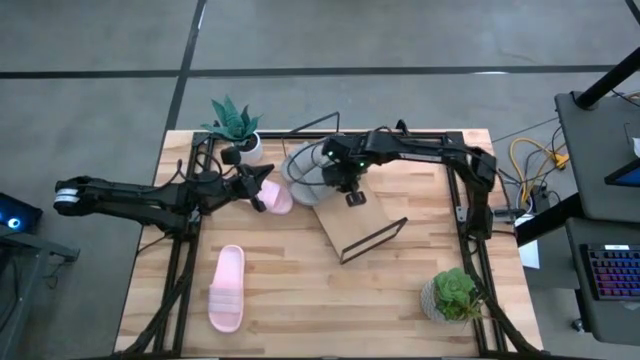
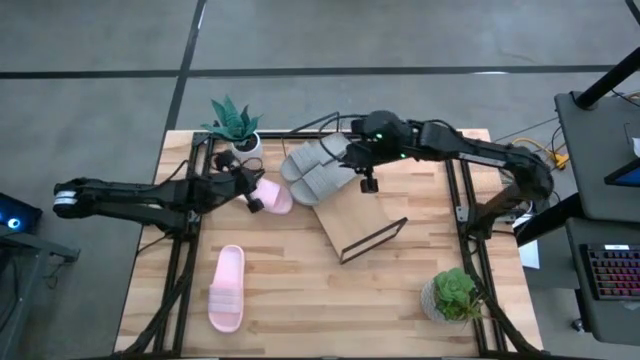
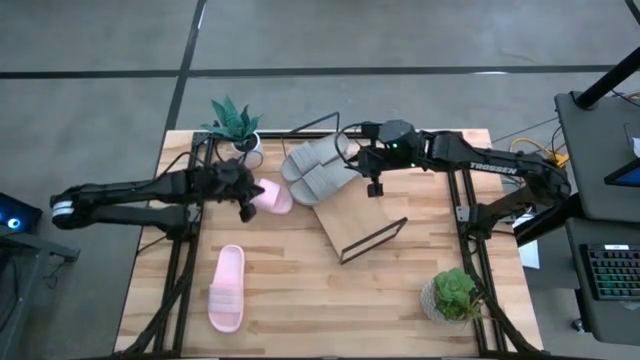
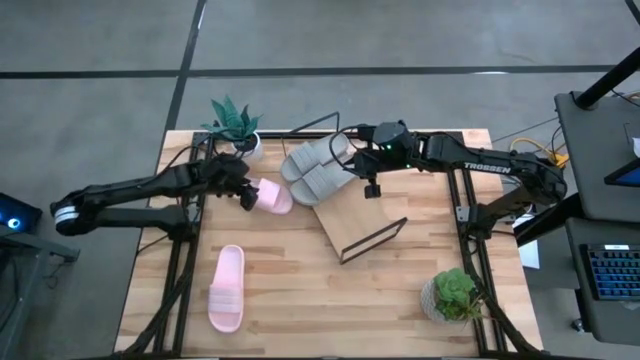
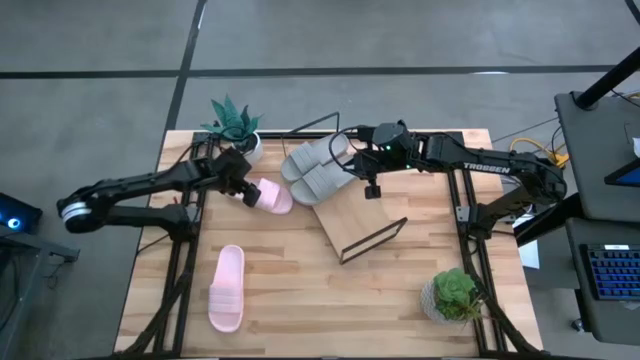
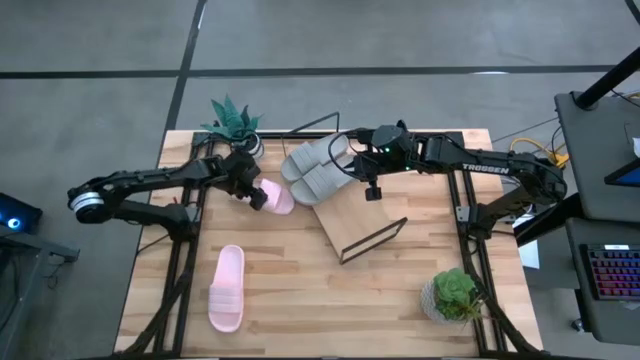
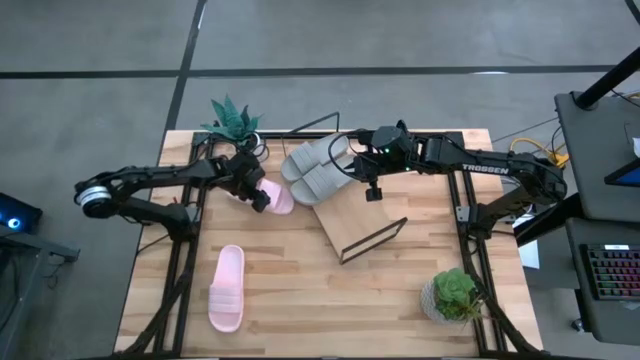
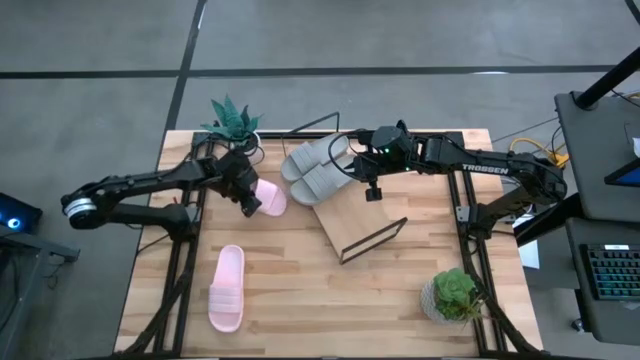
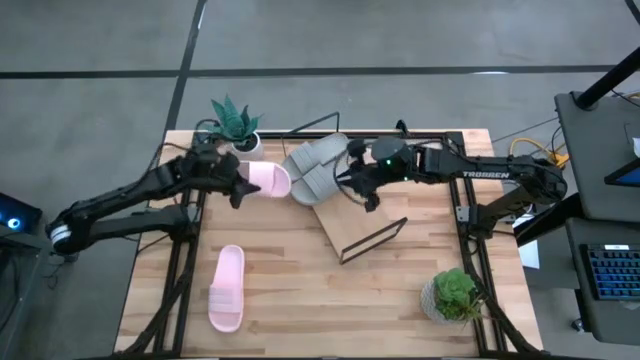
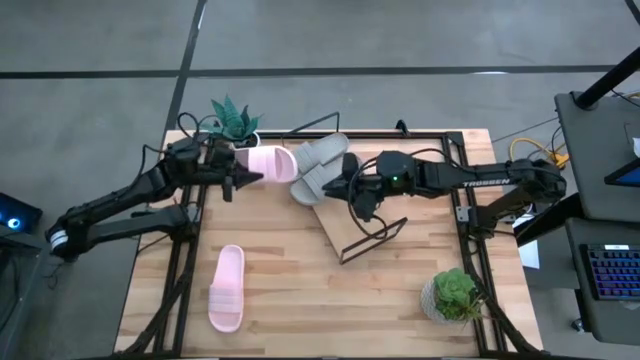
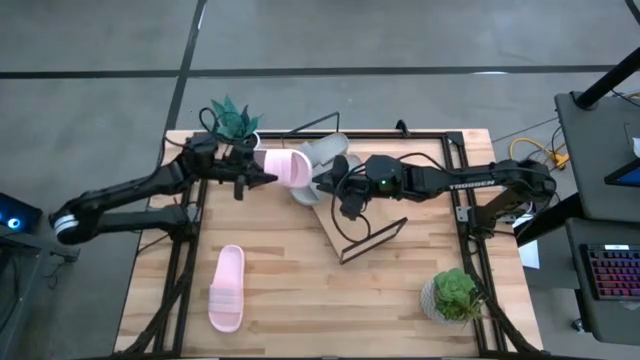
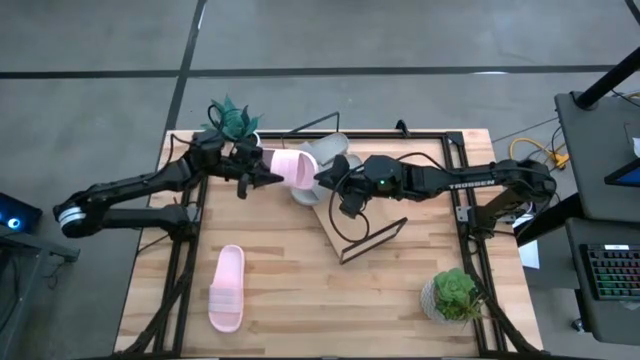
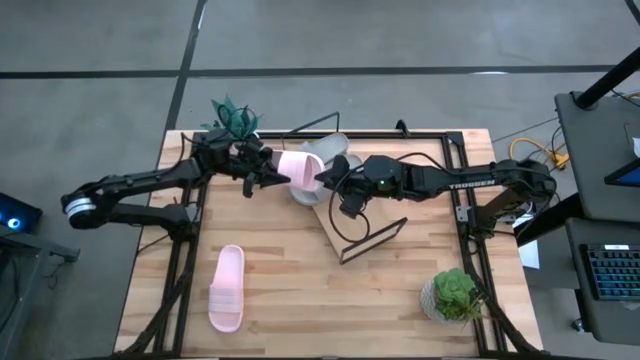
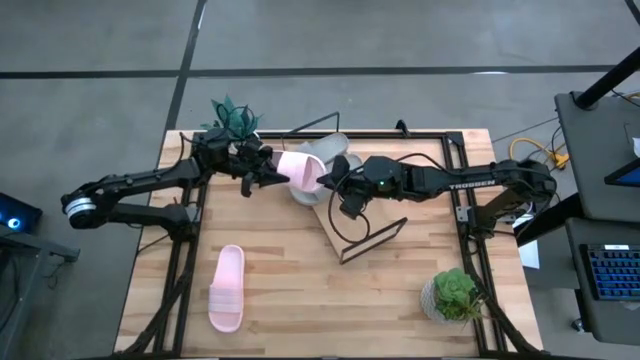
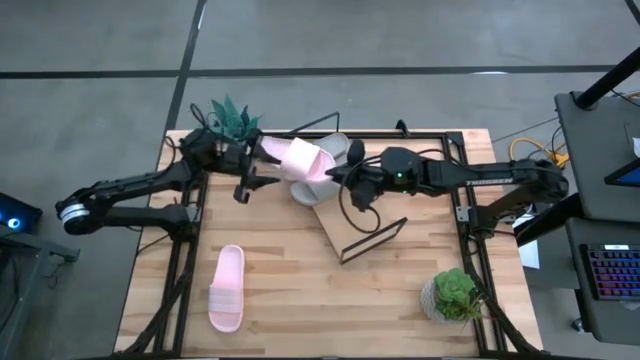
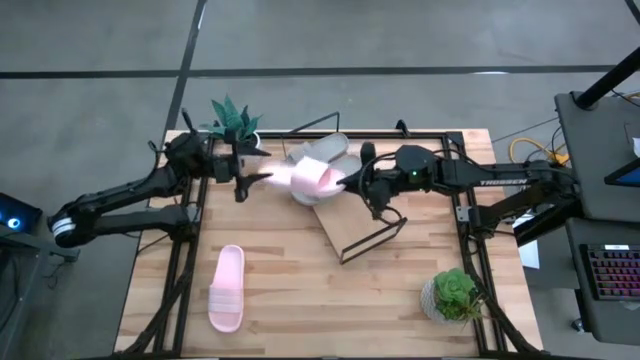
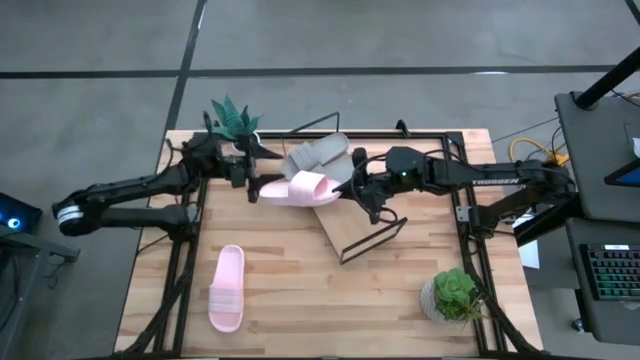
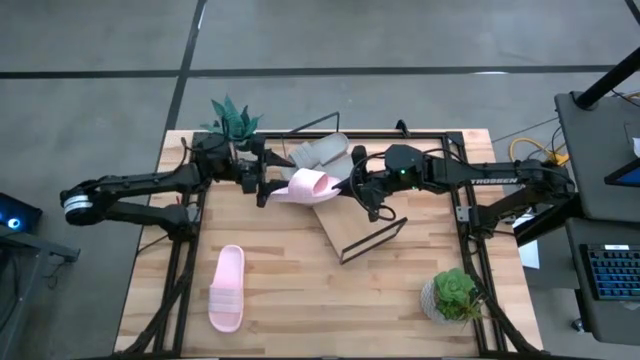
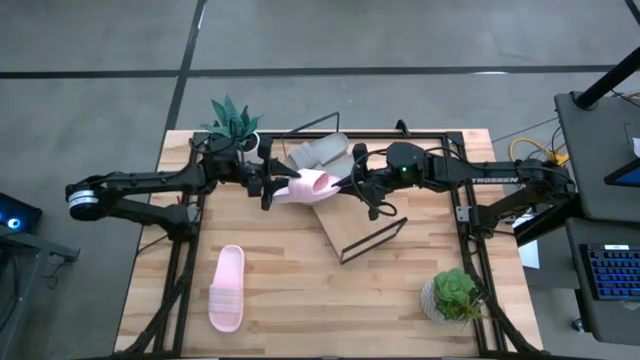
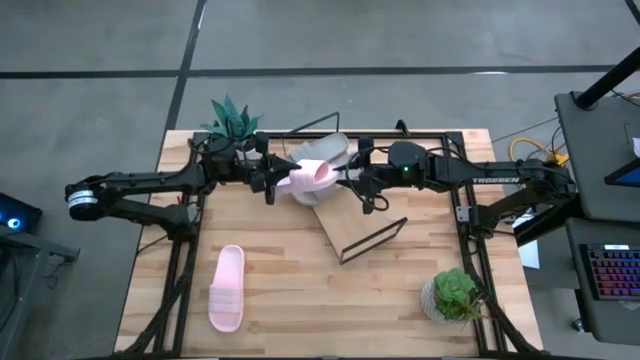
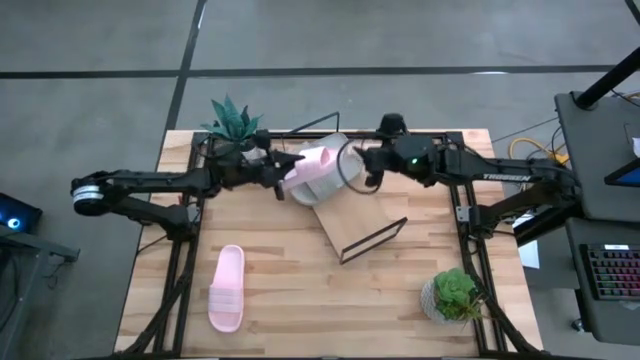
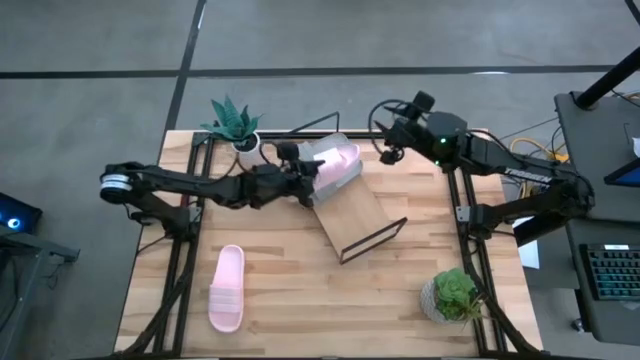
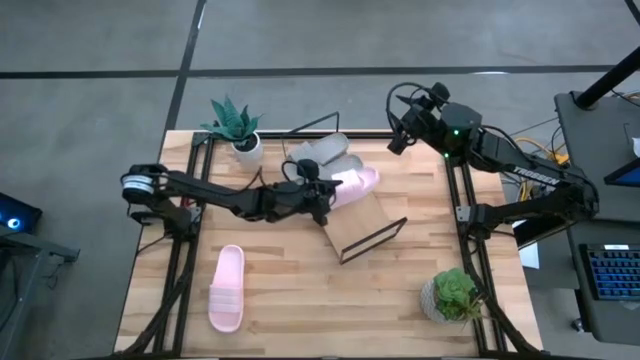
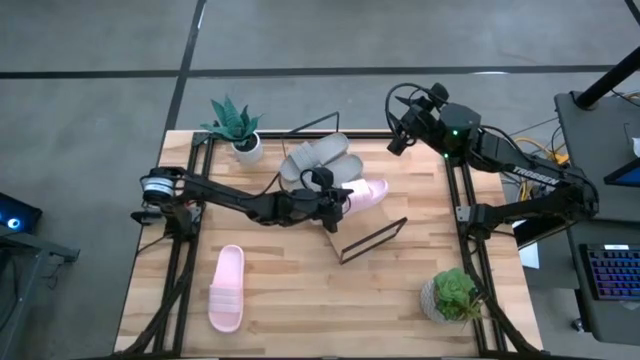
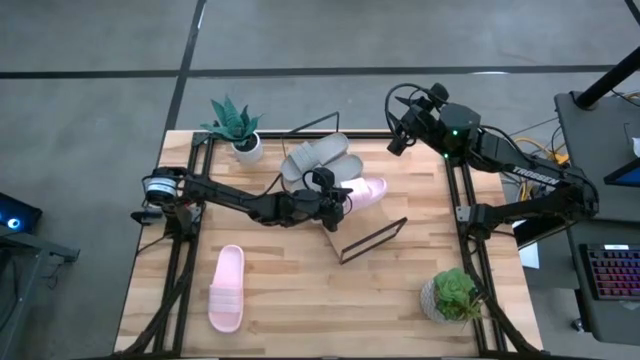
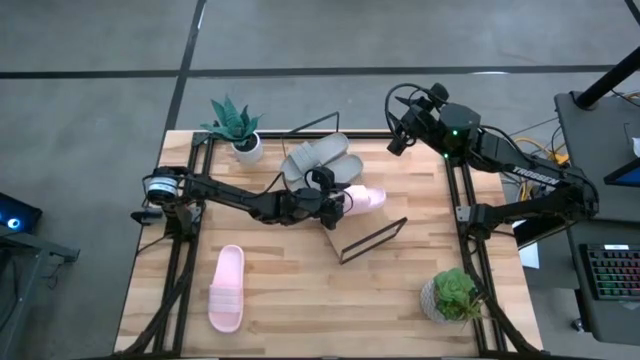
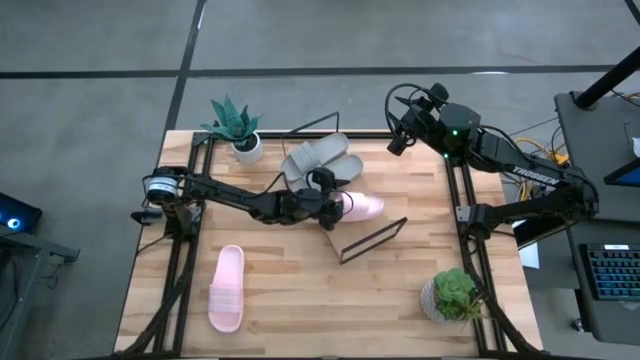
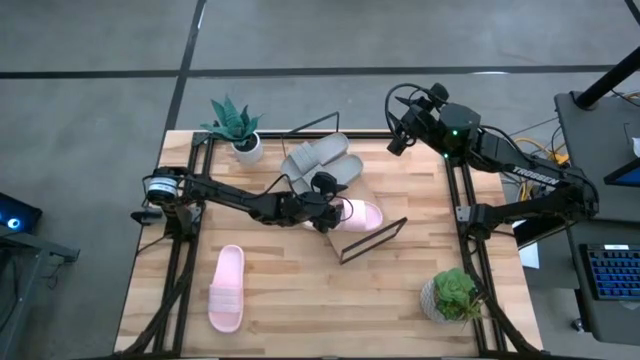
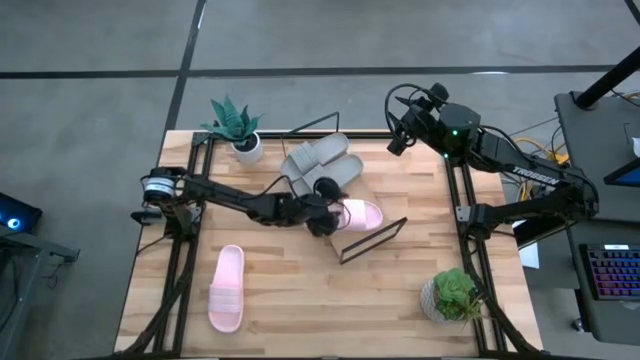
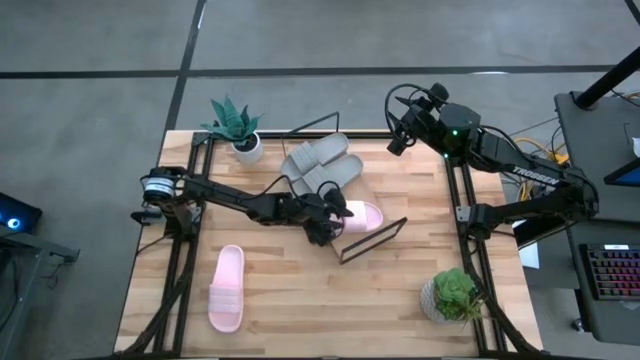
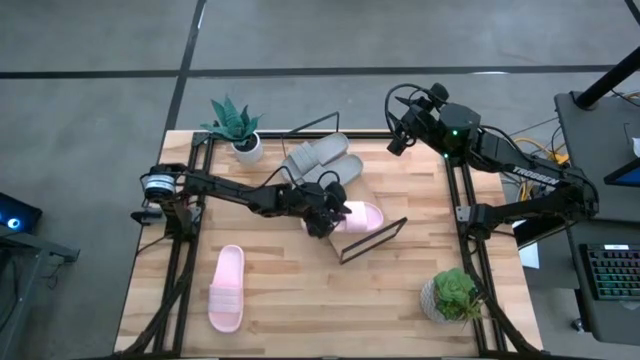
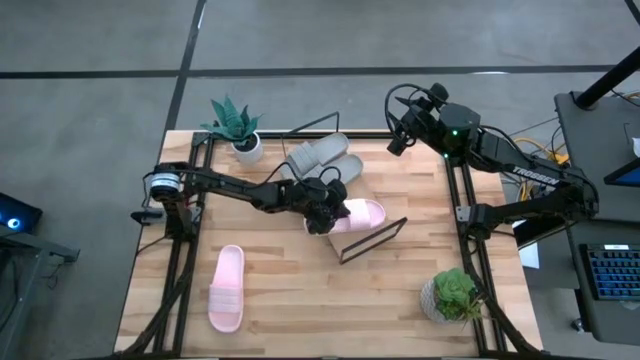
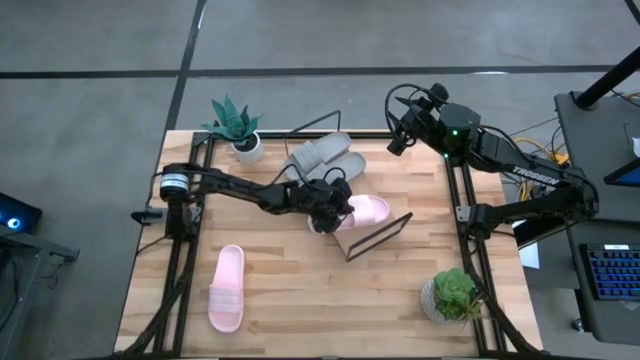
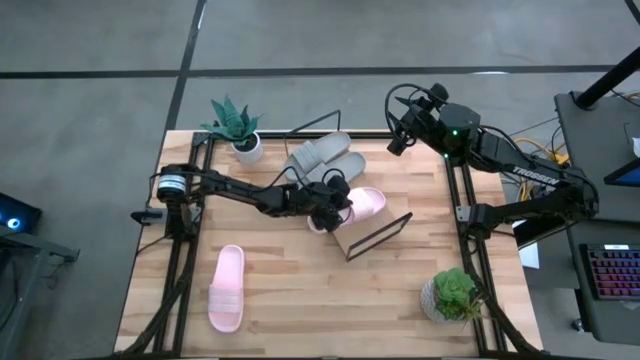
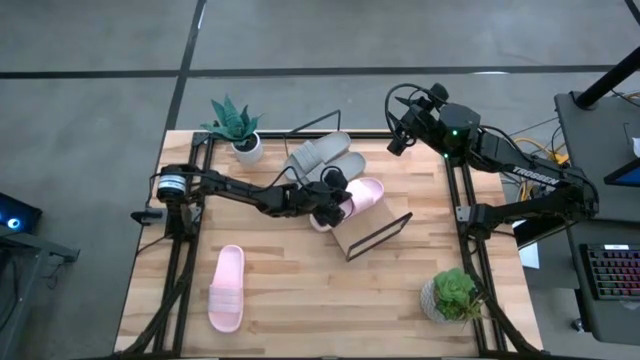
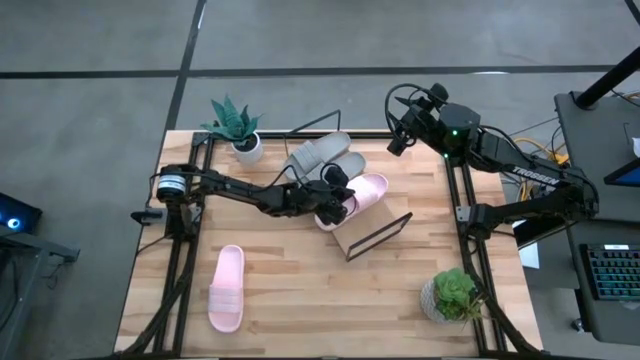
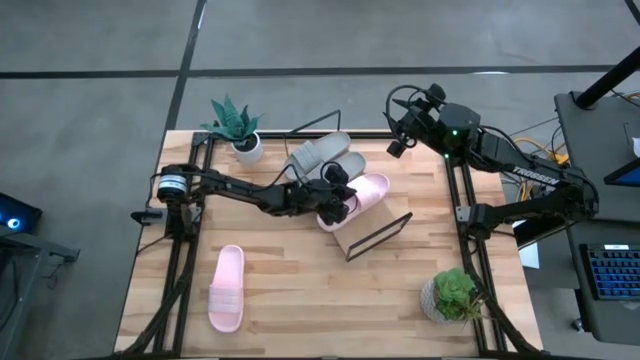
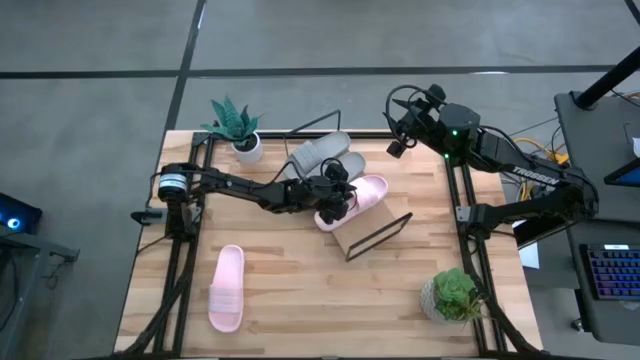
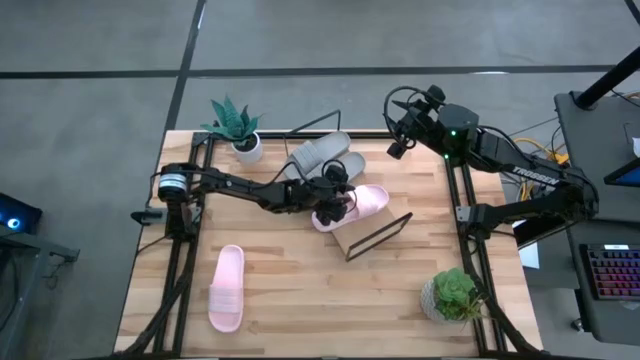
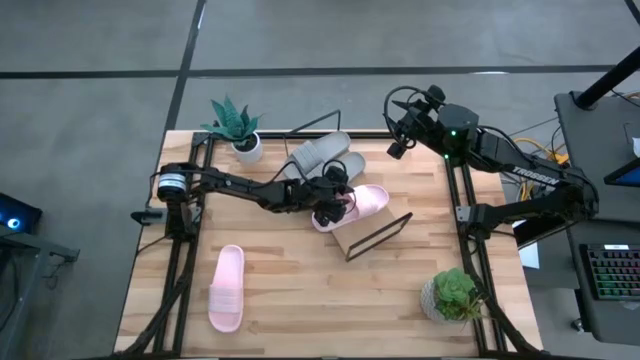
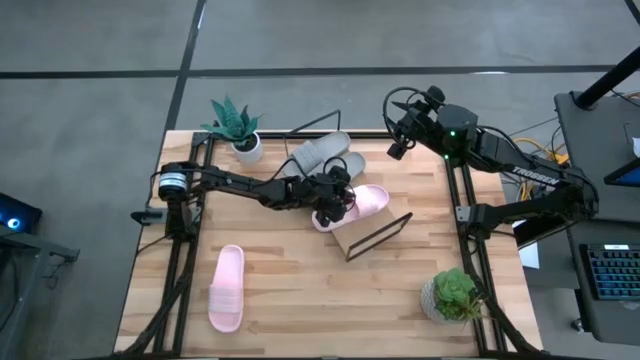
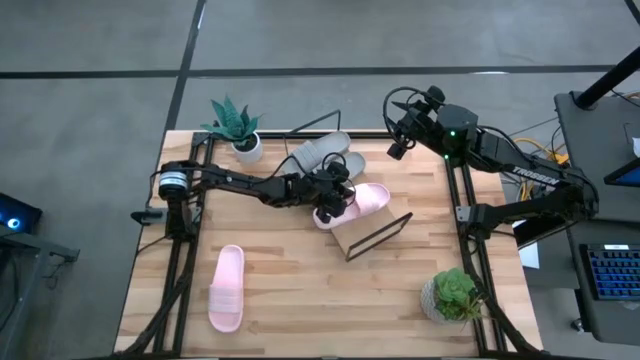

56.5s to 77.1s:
Task: Pick and place slides into the shelf
Put the top pink slide on the shelf
